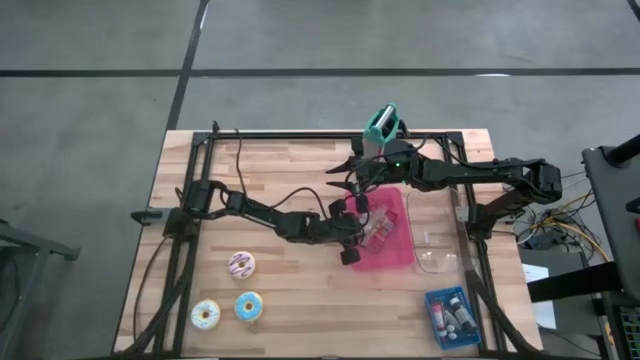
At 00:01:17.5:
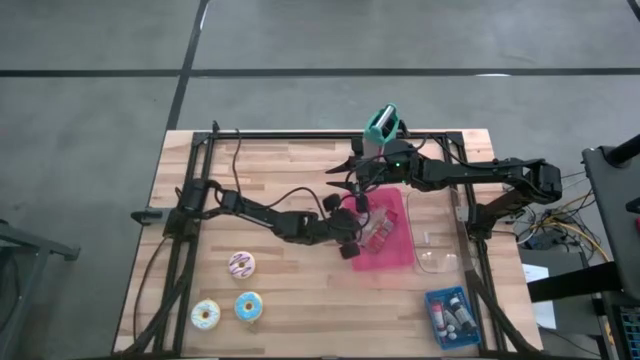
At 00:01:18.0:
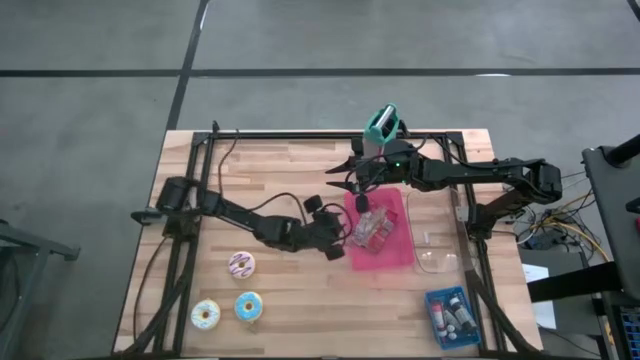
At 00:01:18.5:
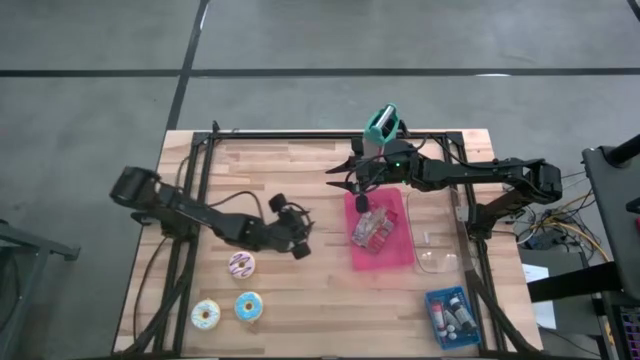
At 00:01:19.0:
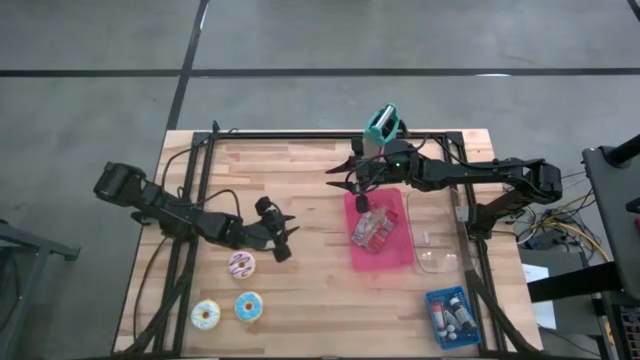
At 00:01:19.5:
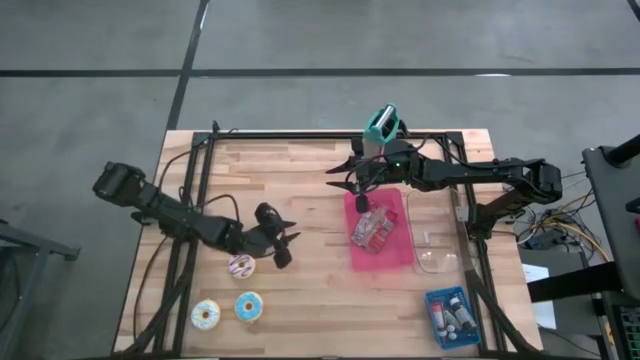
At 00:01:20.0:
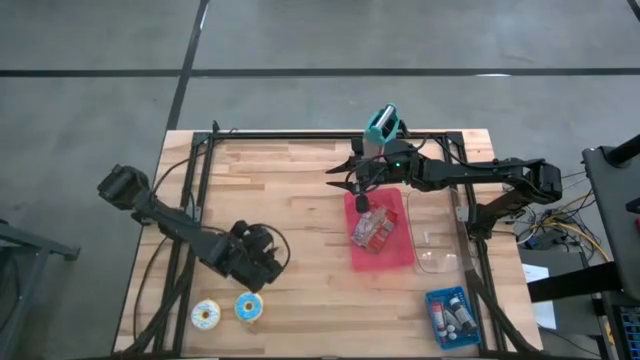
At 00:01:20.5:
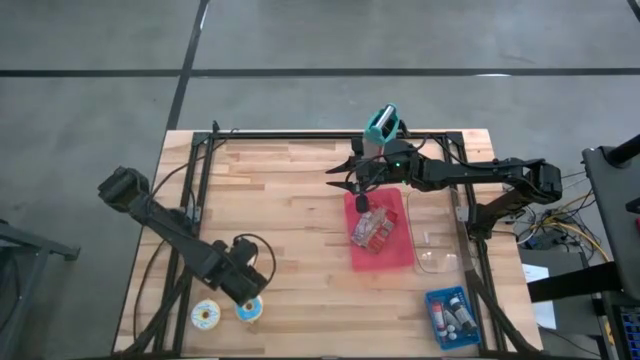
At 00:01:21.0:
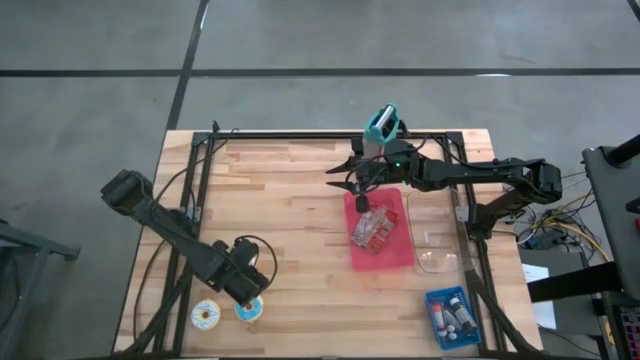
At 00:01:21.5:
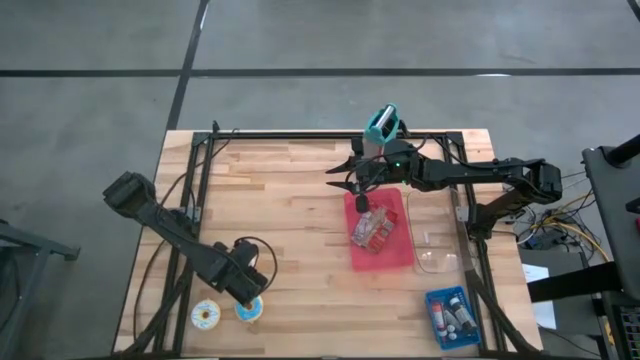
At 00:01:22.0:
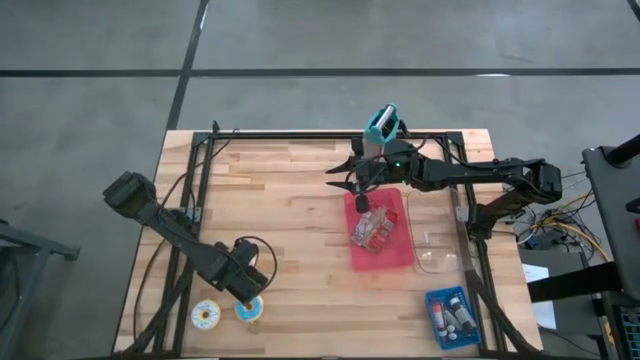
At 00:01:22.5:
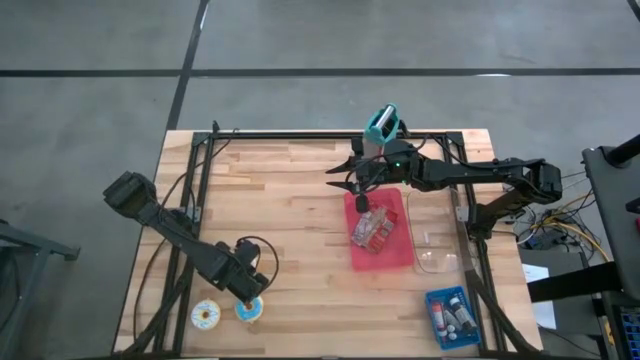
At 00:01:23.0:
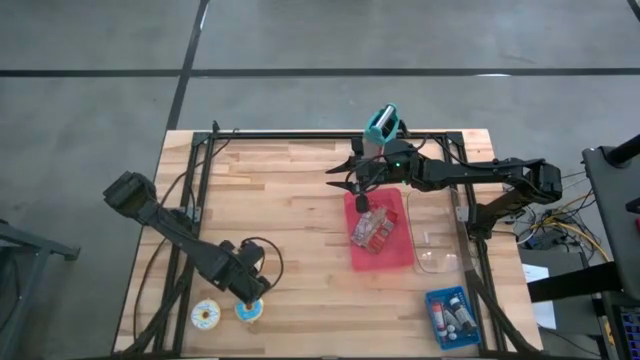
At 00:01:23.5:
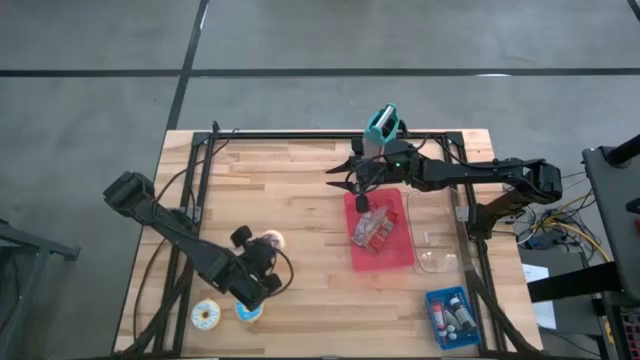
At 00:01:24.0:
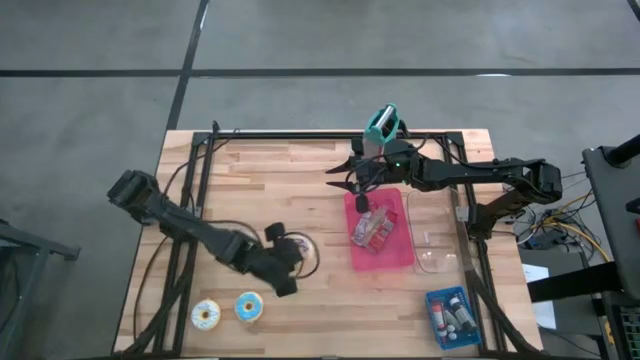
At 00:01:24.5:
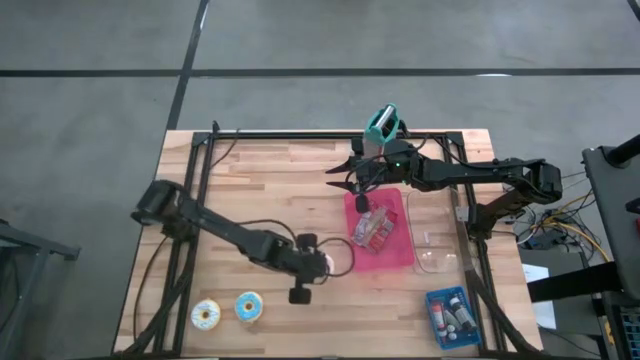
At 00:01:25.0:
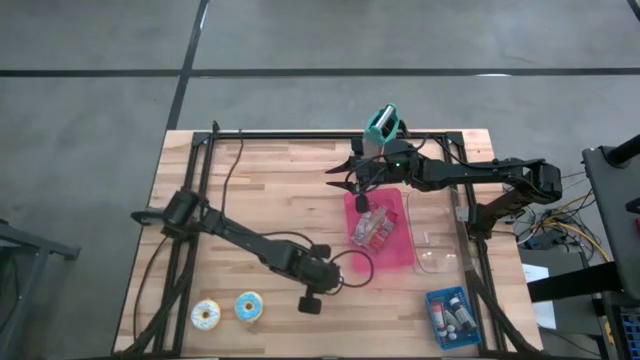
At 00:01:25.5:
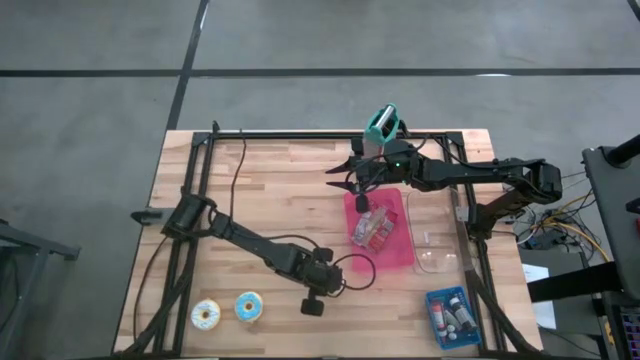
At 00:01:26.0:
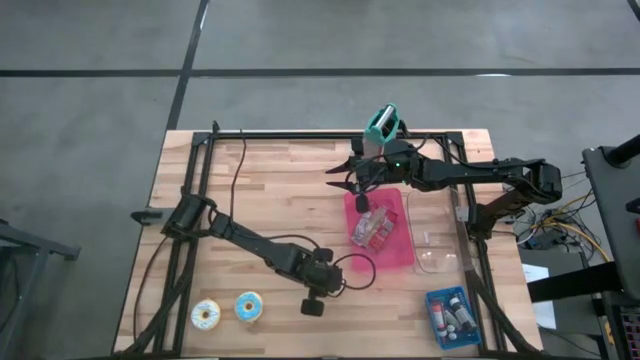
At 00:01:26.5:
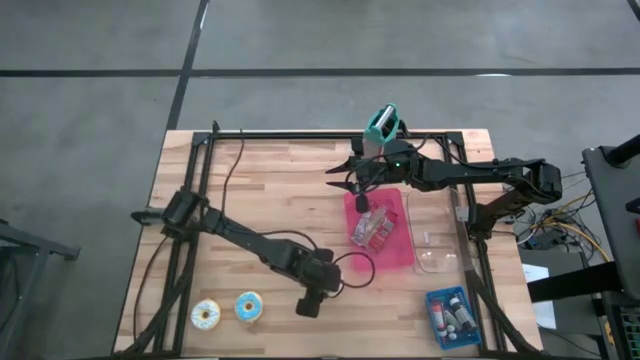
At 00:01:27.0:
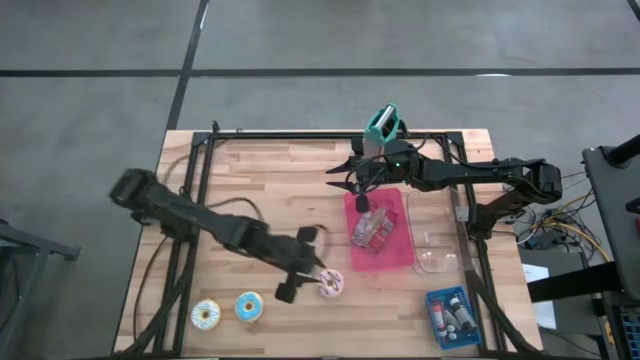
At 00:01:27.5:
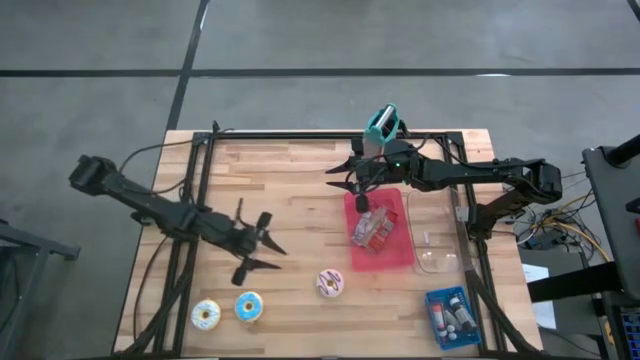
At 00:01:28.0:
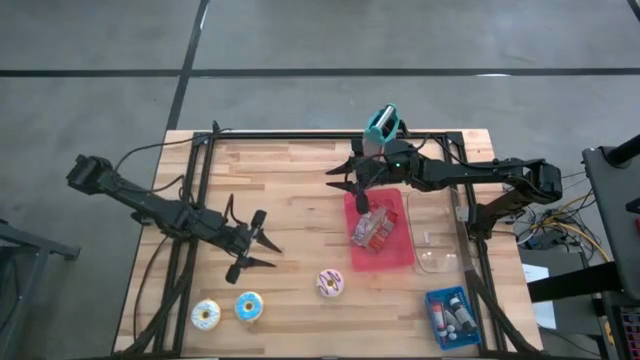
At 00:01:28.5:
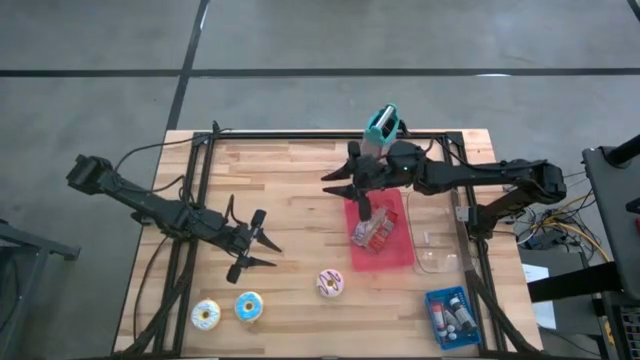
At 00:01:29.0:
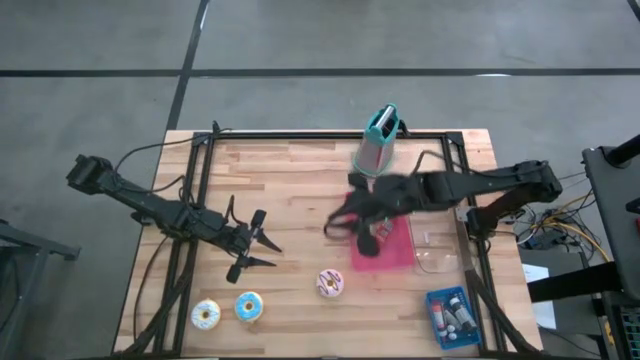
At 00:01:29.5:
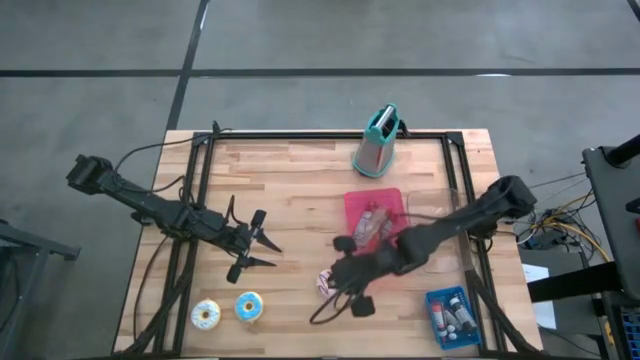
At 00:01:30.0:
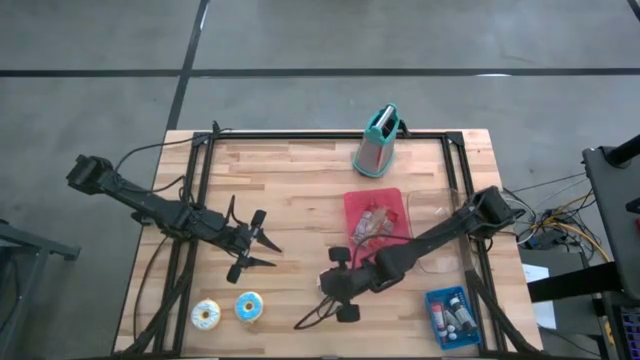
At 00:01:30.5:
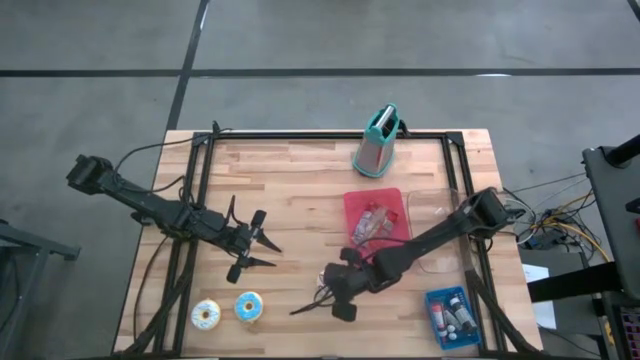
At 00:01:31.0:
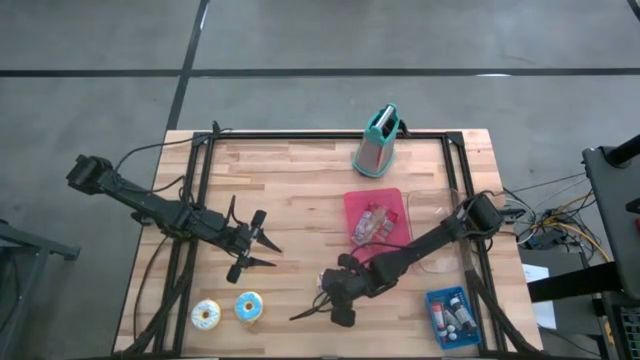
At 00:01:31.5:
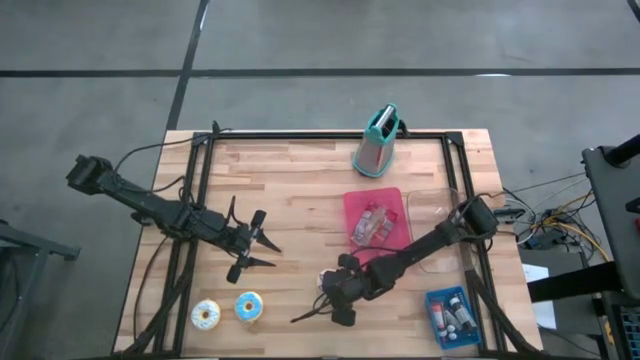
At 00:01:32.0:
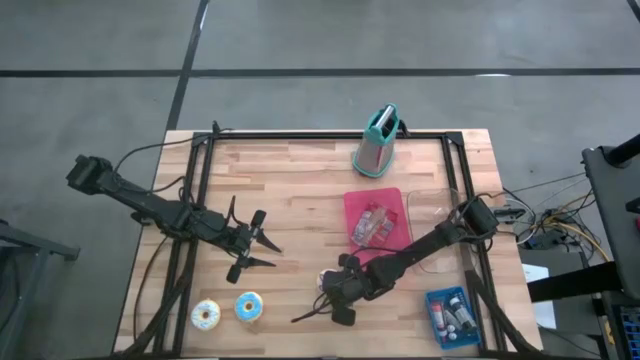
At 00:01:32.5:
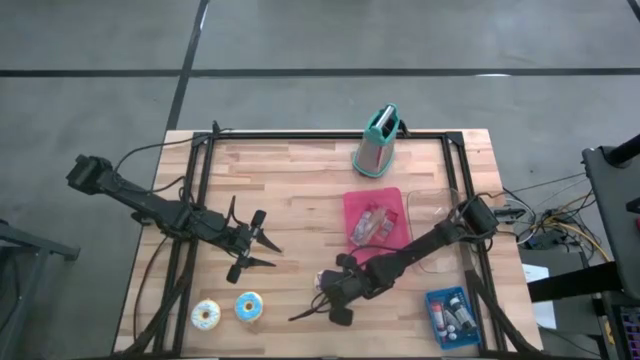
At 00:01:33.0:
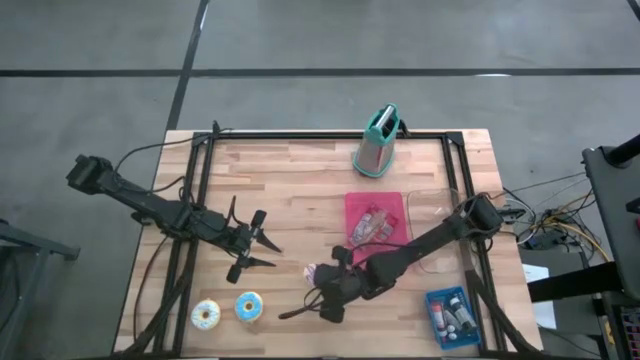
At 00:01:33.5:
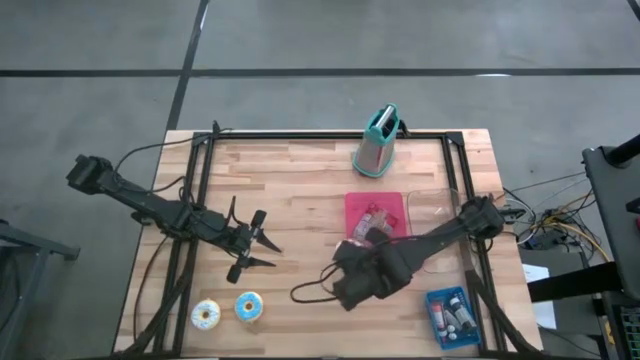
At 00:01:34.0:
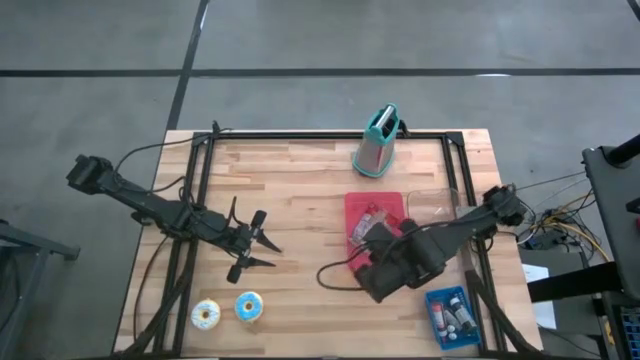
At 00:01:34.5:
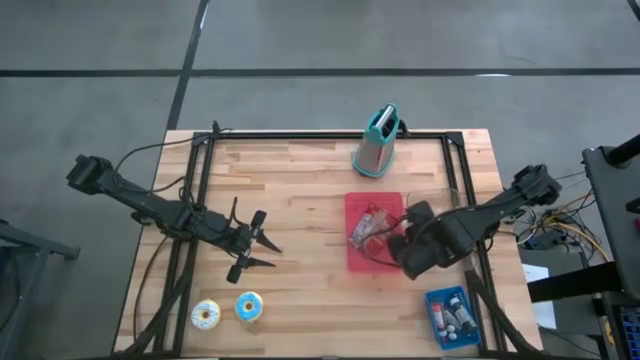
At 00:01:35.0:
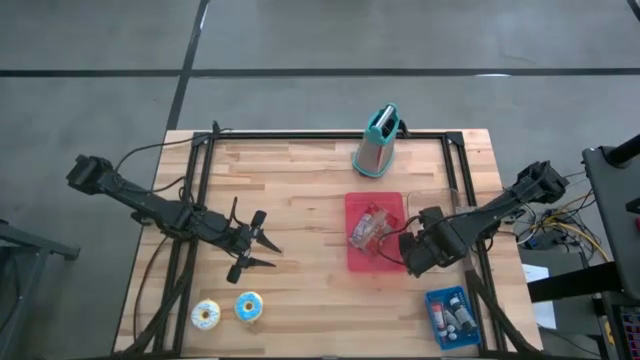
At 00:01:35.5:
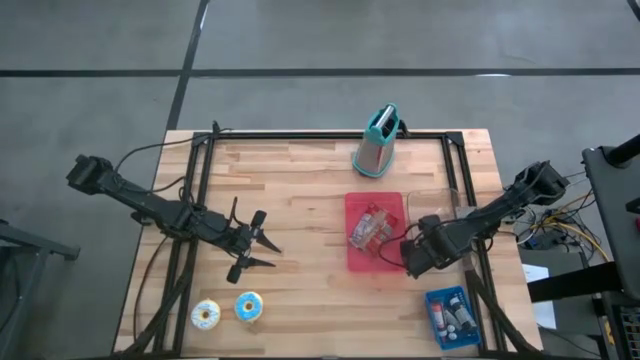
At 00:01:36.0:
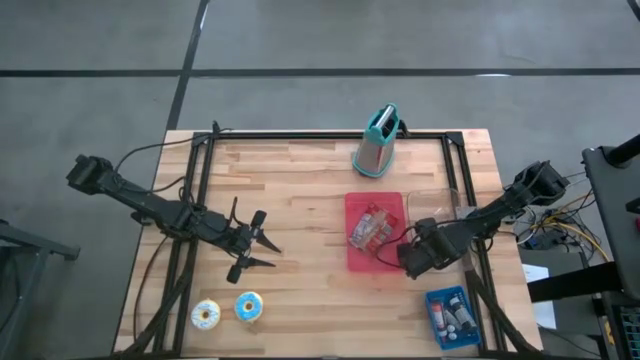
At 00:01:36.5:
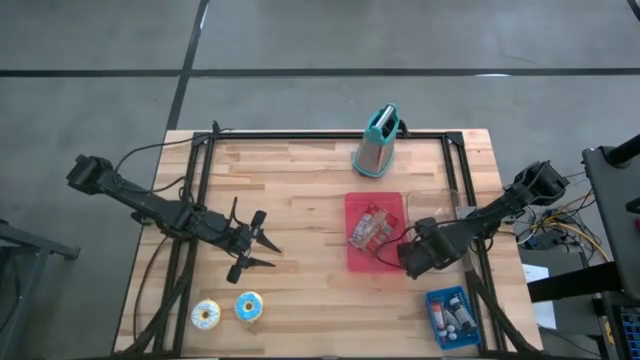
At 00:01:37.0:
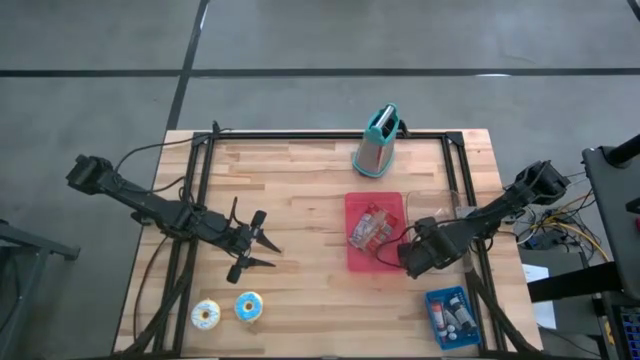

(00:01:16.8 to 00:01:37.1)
Task: Pick & Place Food Item
Put the purple donut into the transparent bin
